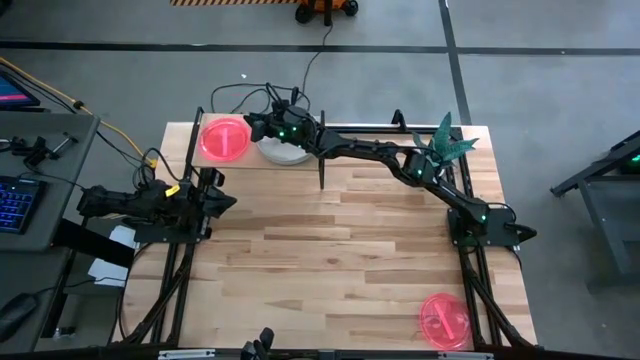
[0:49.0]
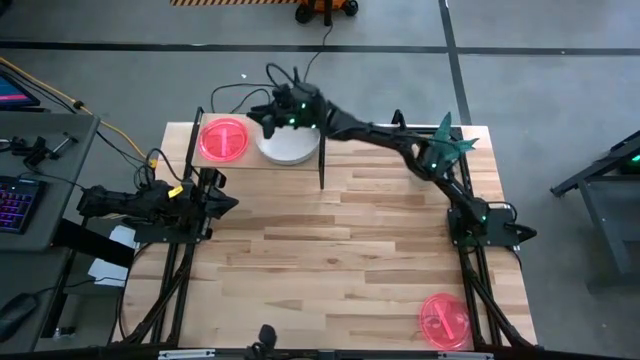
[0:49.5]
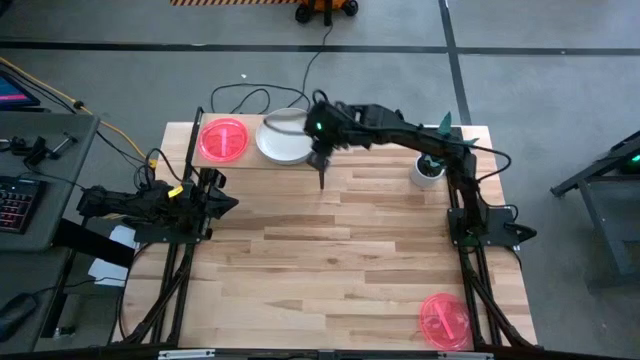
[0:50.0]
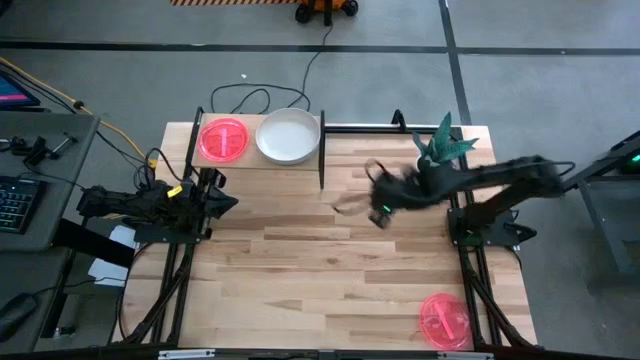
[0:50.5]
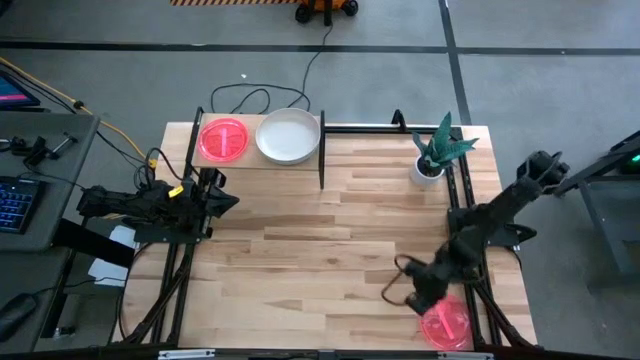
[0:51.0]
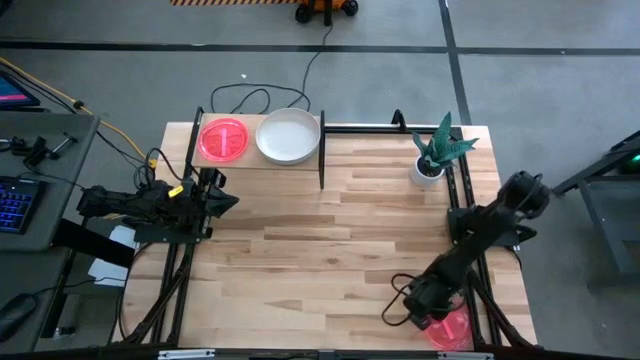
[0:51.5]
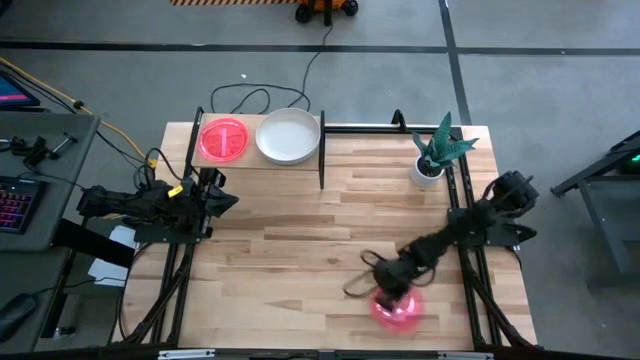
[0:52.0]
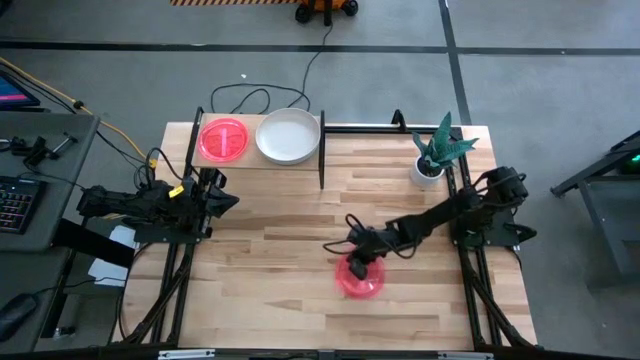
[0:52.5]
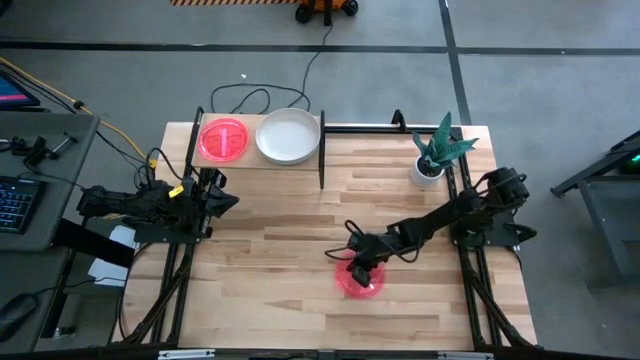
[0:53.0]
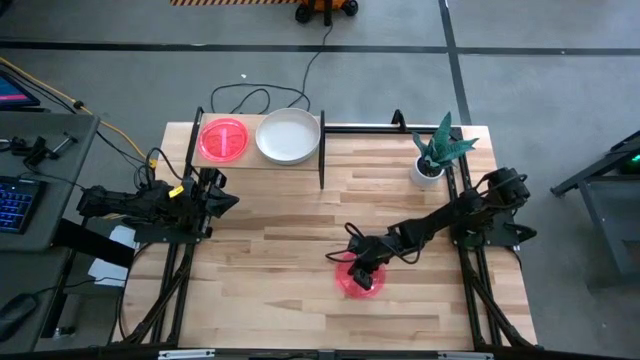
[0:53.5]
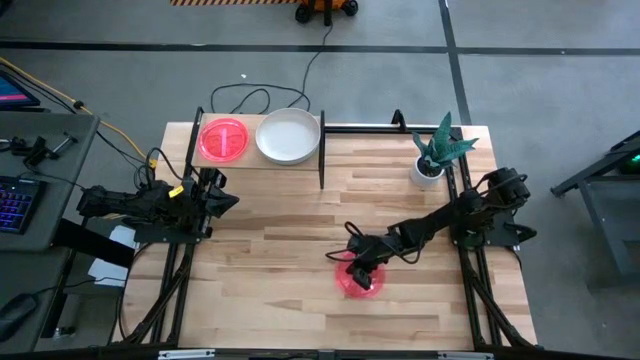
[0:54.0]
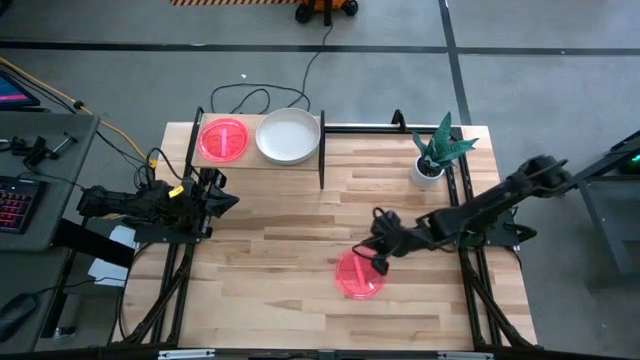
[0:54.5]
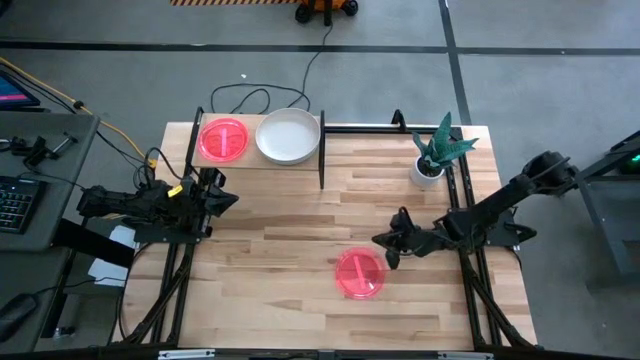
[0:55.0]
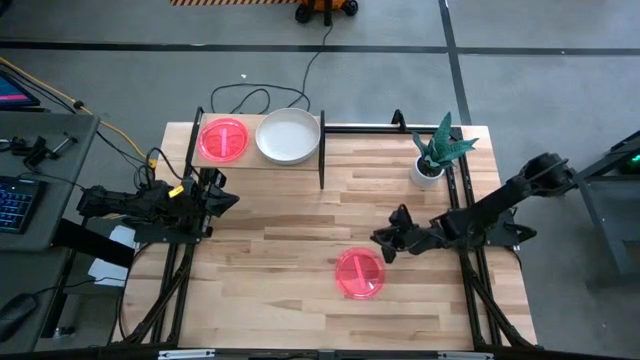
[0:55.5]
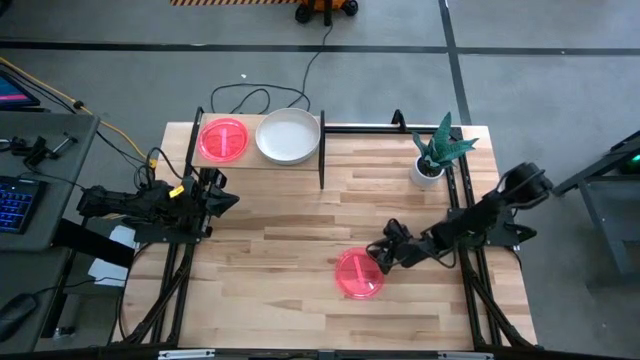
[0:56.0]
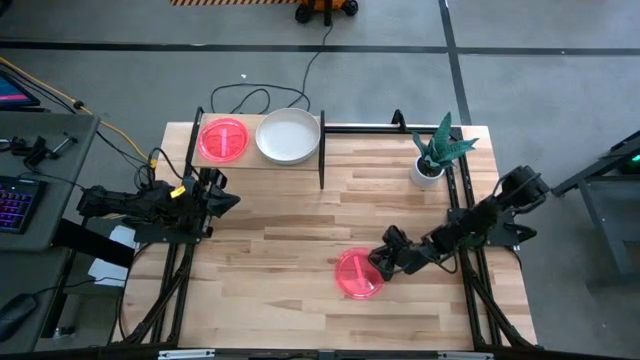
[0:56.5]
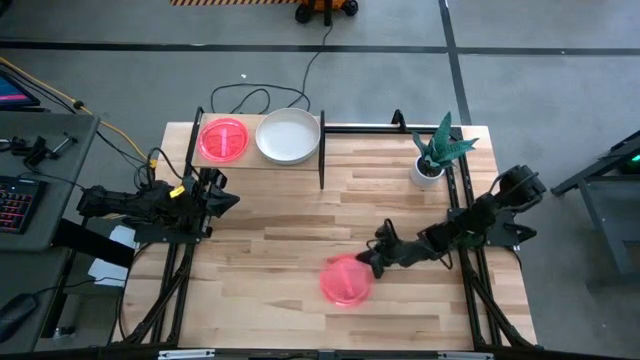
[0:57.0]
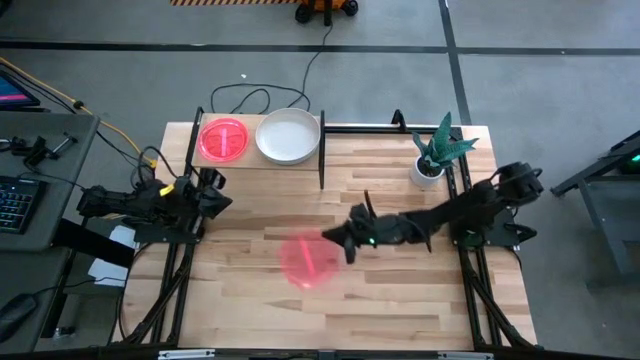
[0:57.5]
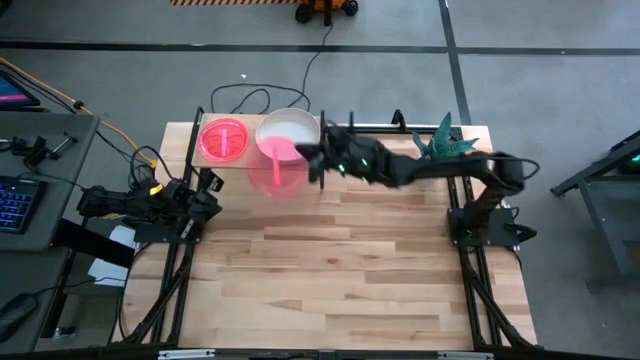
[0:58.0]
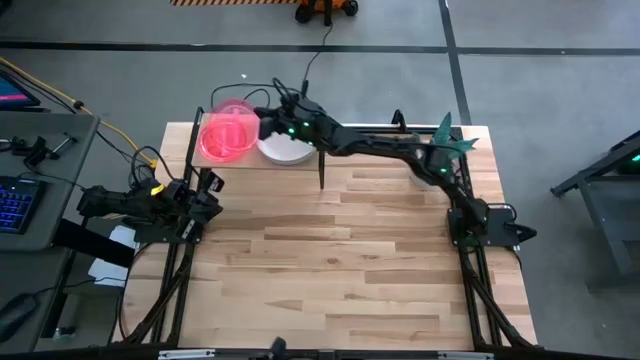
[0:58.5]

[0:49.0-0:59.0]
Task: Place and stack plates onto a shelf
Stack the transparent pink plate on top of the pink transparent plate on the shelf

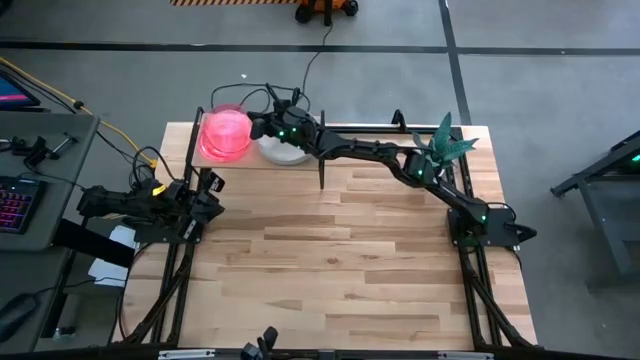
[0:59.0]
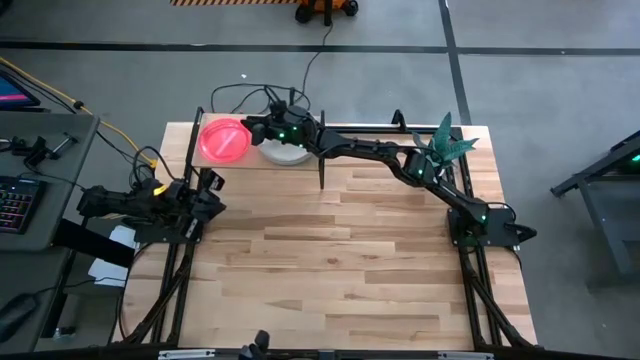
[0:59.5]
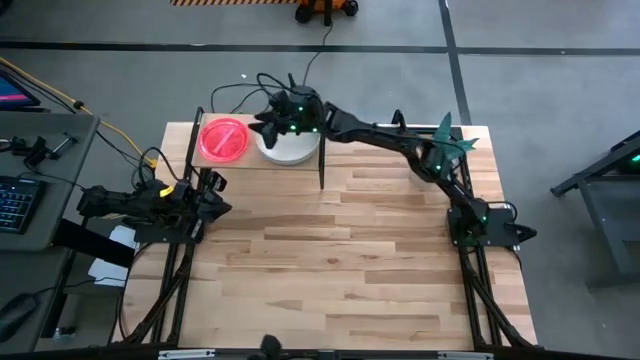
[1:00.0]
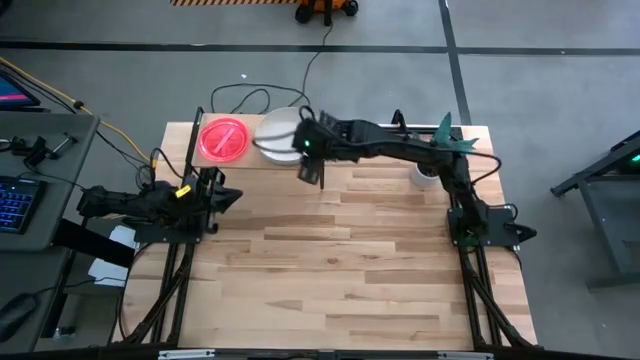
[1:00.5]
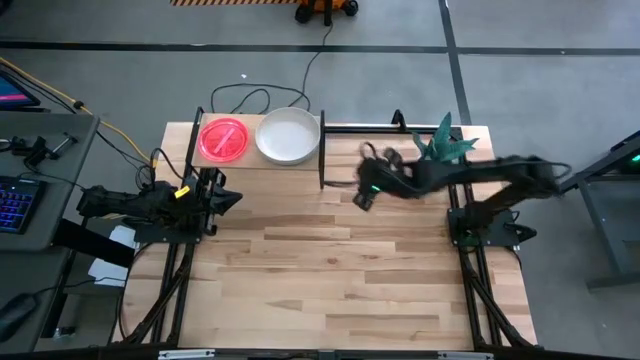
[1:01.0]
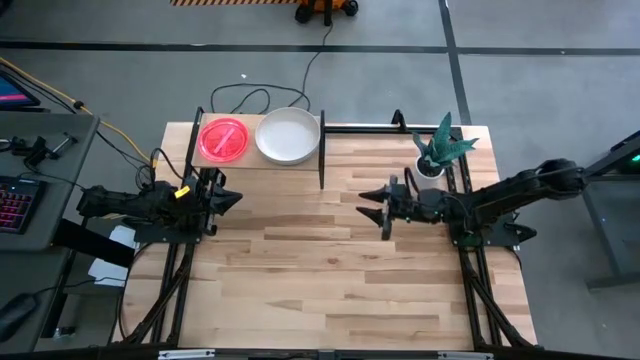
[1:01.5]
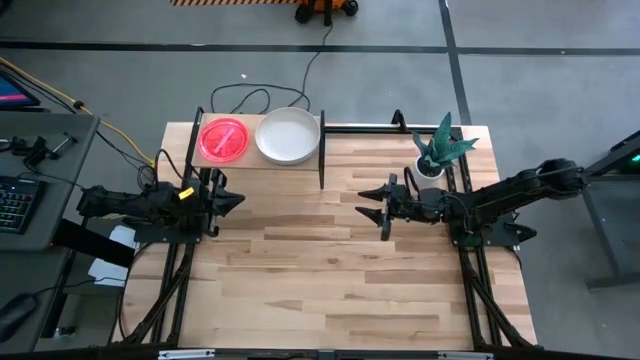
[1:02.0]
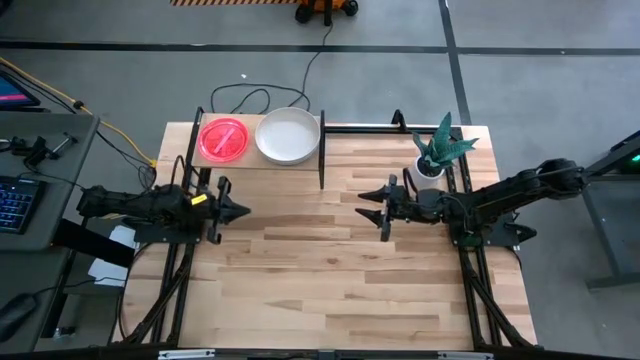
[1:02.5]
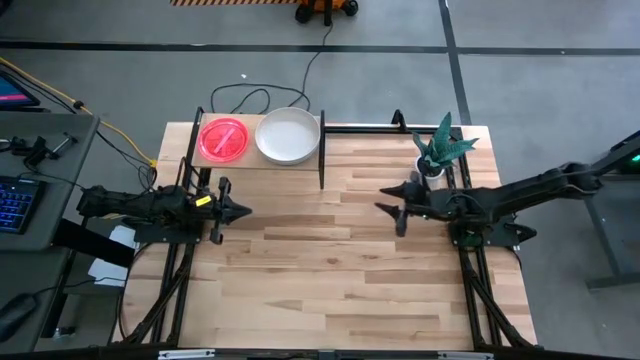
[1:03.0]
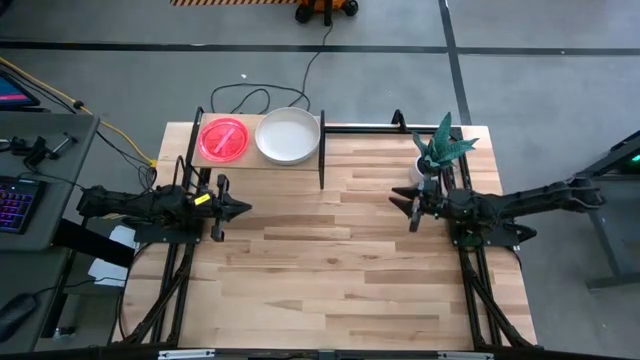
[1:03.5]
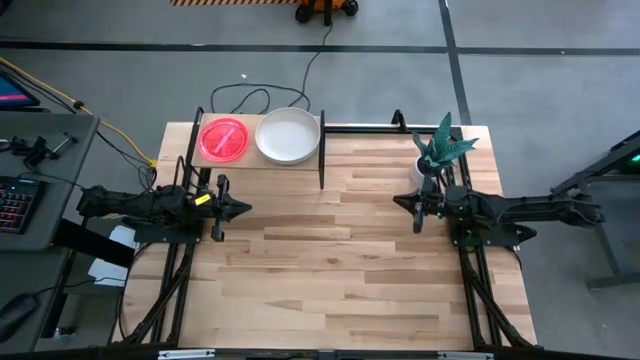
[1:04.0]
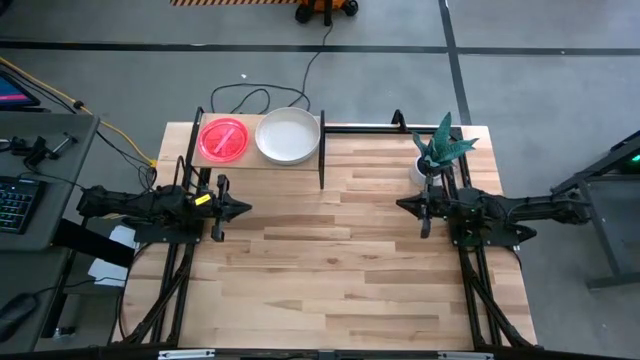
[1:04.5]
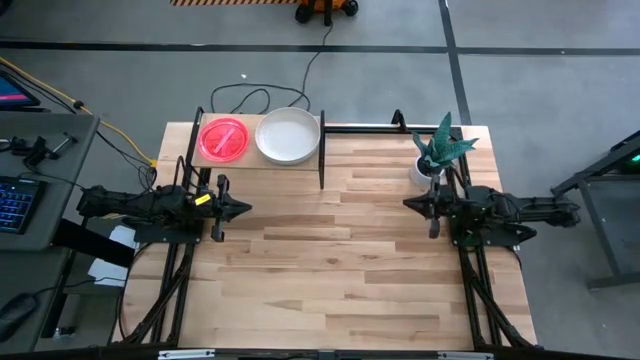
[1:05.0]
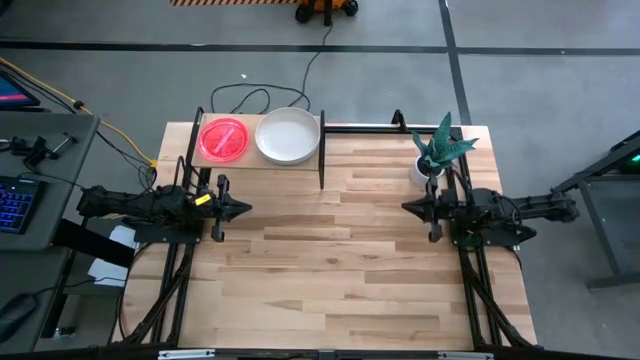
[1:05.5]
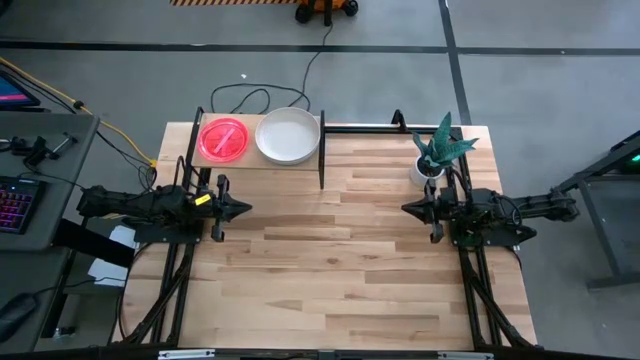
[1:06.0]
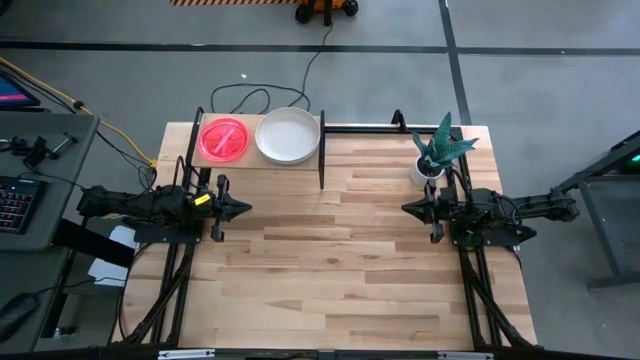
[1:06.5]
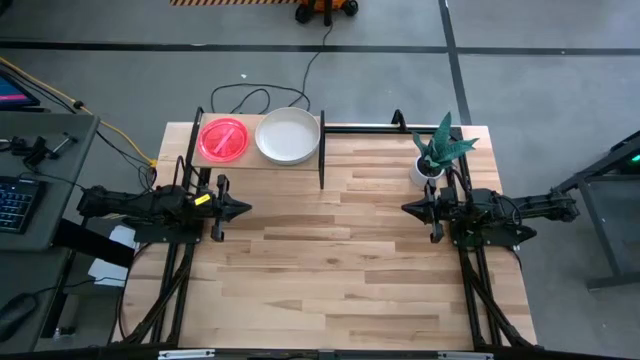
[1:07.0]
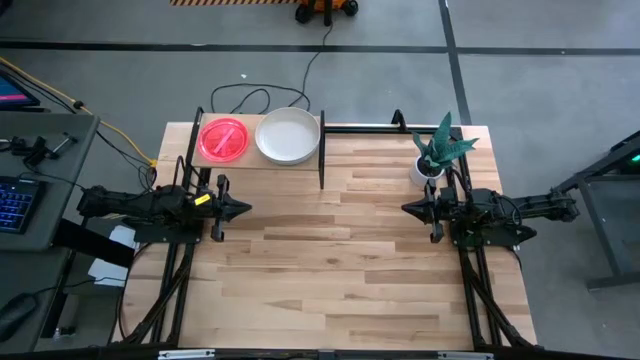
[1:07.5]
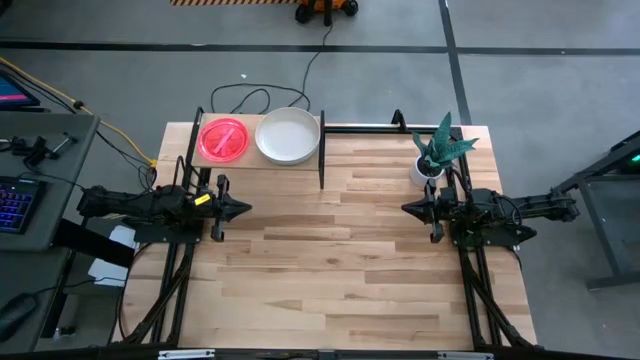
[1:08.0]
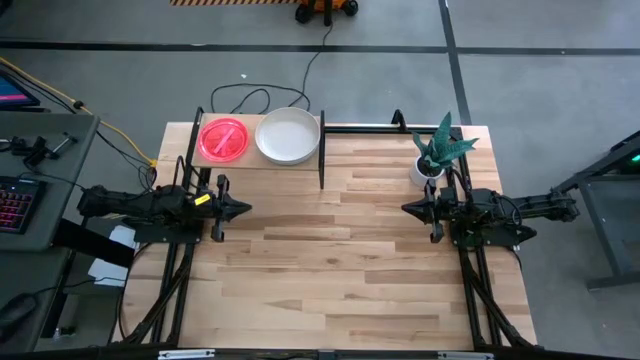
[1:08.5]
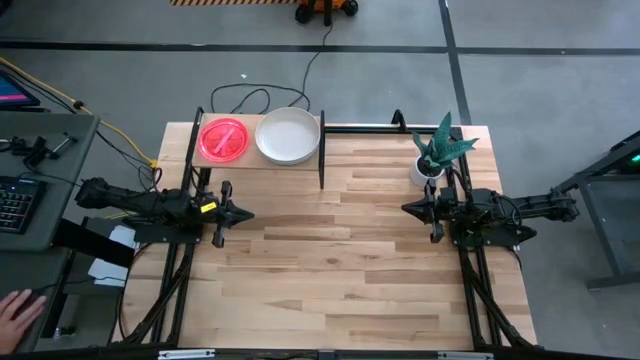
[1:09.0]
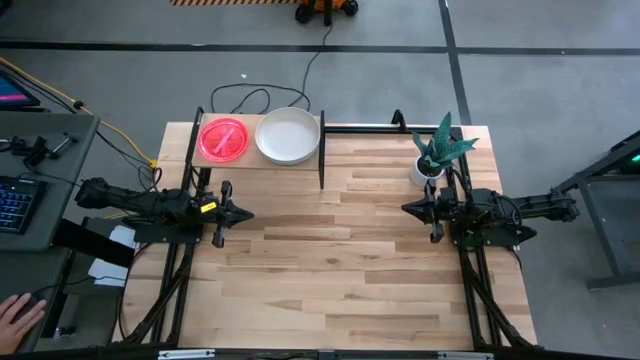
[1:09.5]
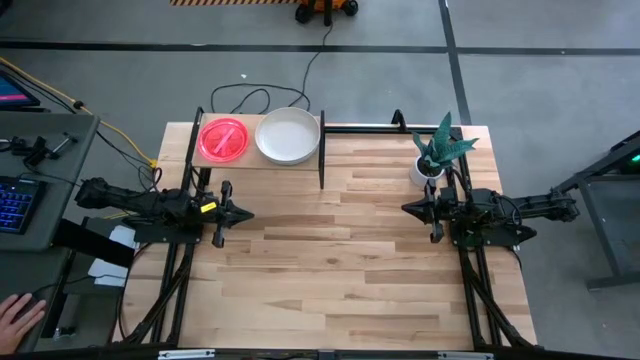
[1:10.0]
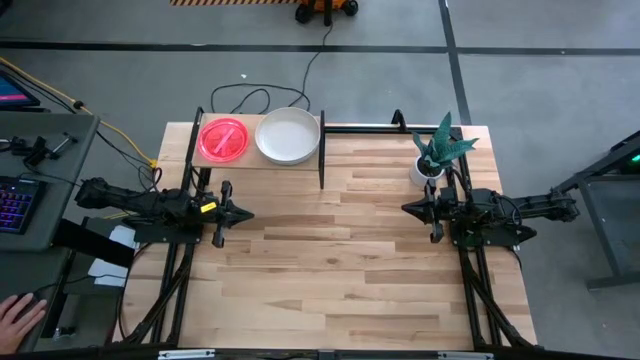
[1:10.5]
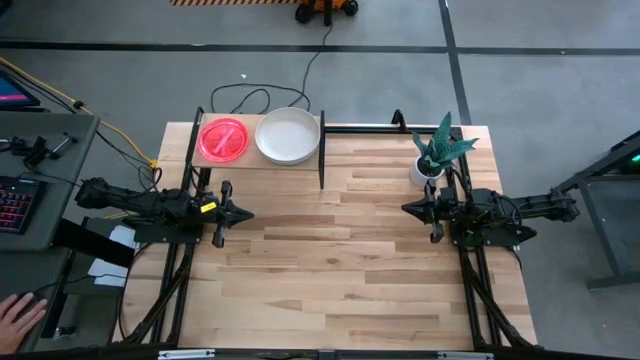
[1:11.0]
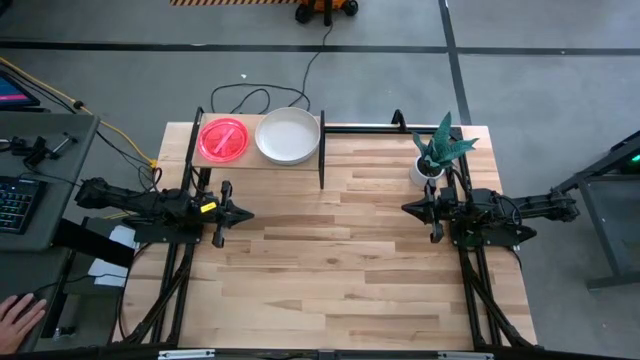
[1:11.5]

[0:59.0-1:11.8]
Return to Home Position
